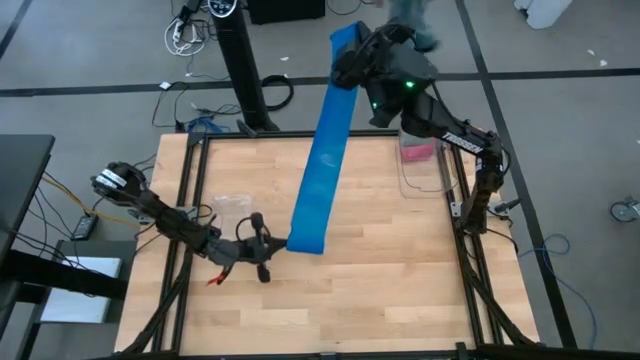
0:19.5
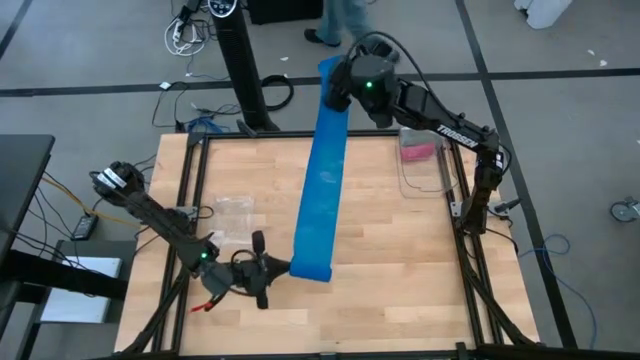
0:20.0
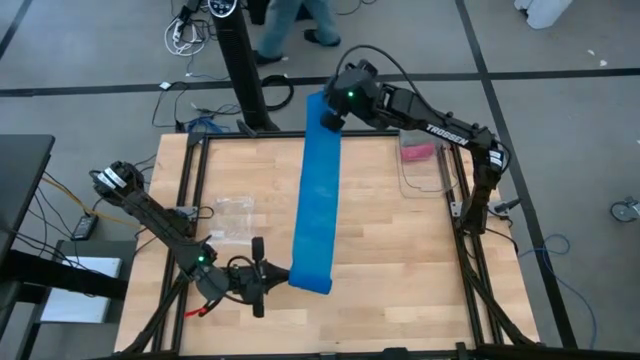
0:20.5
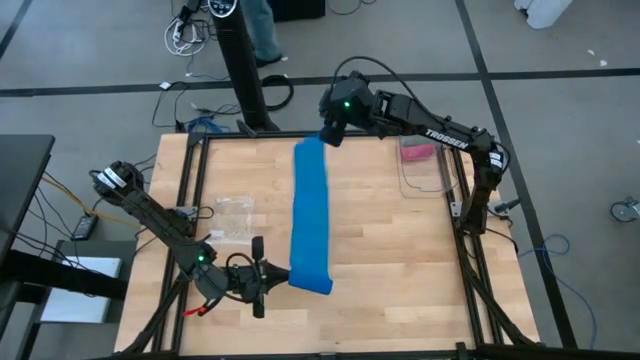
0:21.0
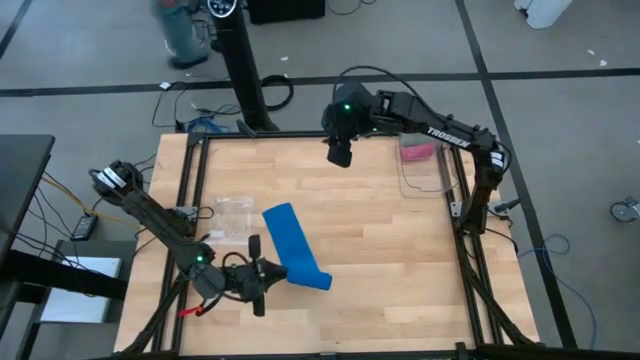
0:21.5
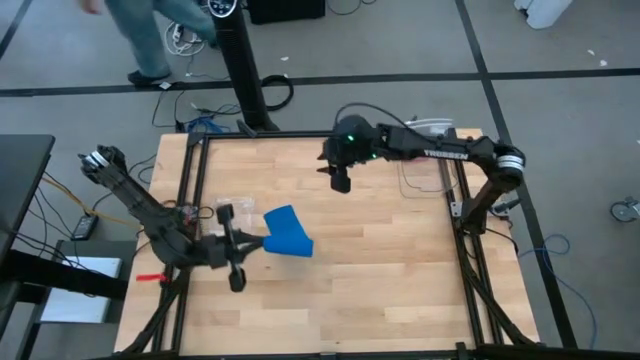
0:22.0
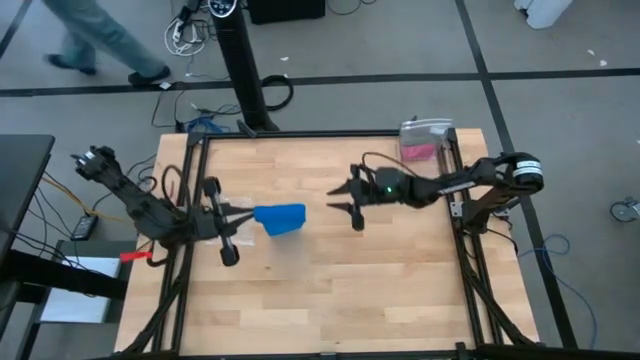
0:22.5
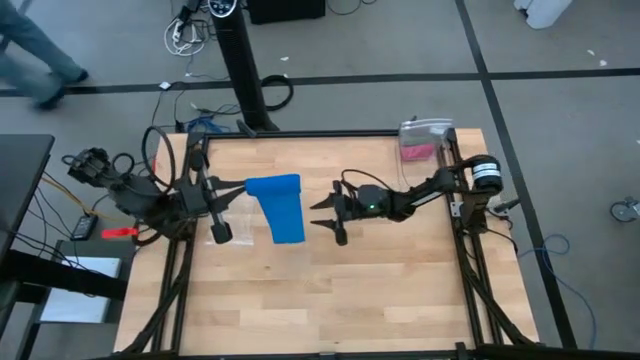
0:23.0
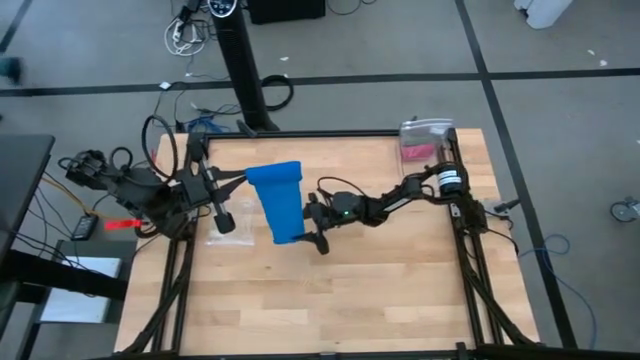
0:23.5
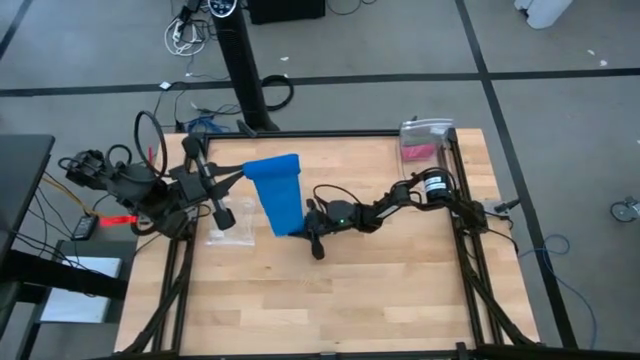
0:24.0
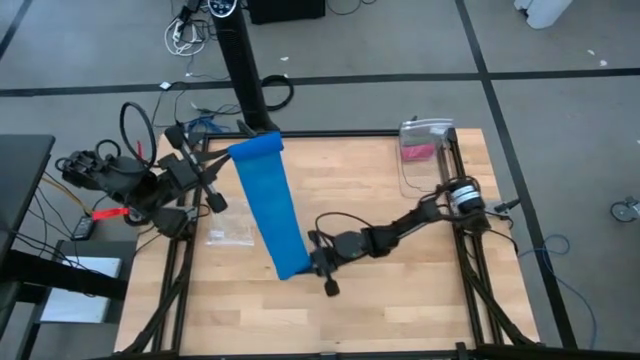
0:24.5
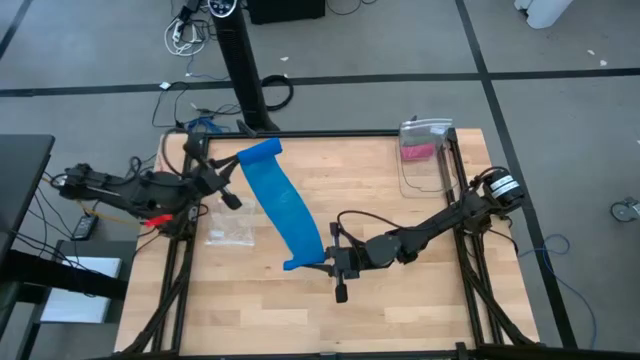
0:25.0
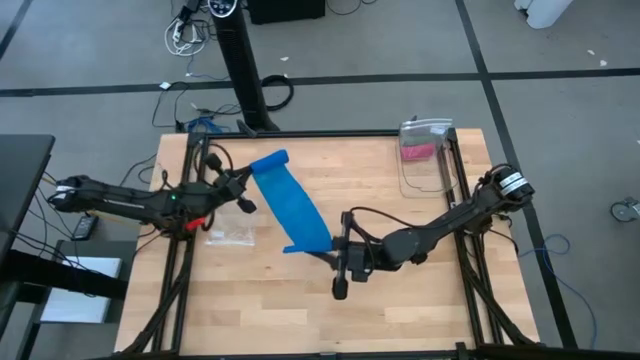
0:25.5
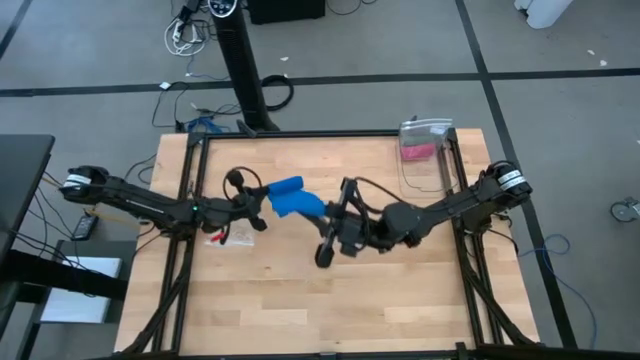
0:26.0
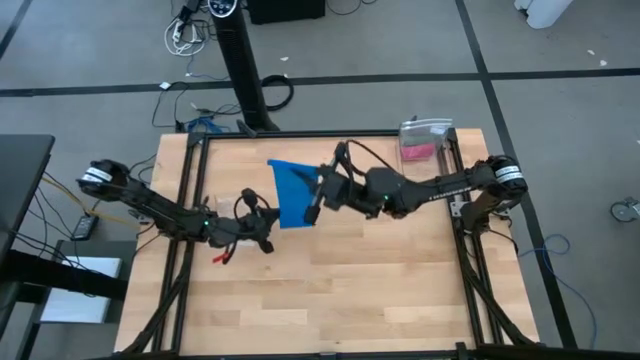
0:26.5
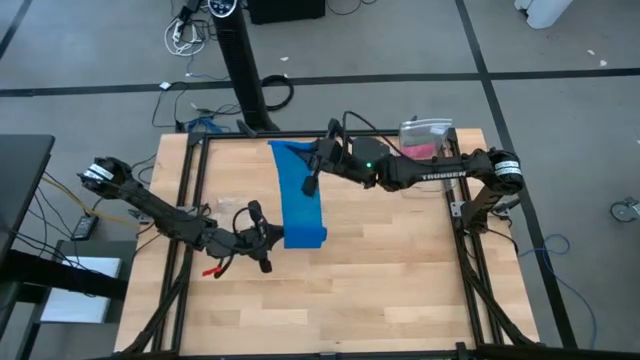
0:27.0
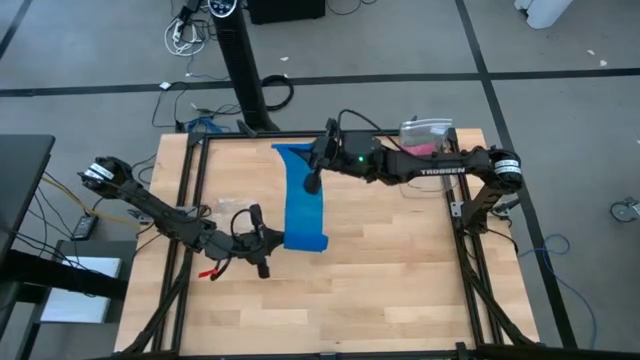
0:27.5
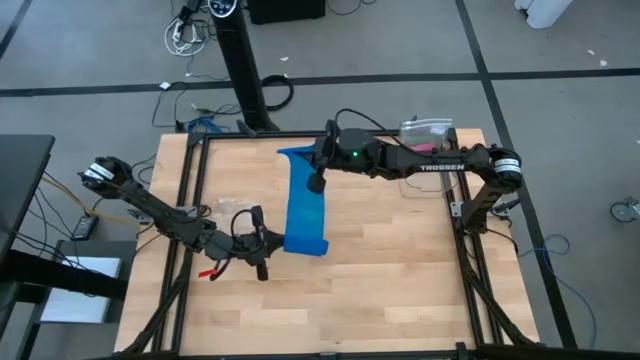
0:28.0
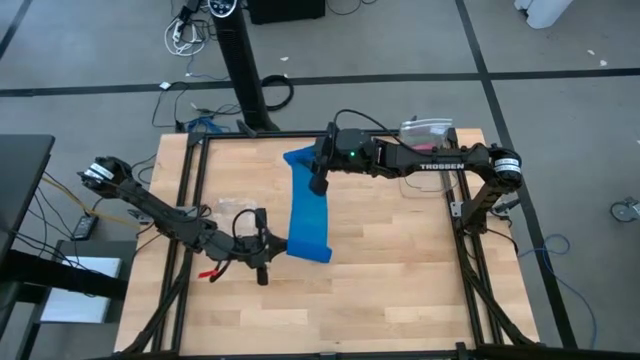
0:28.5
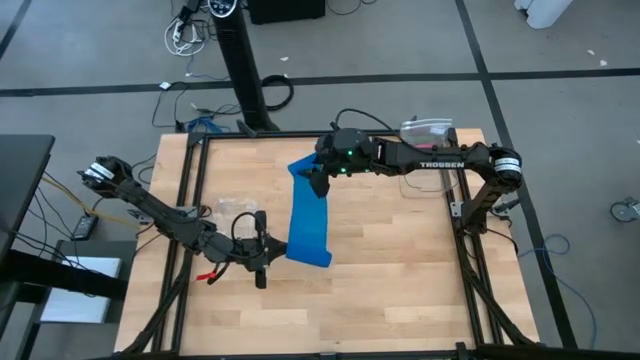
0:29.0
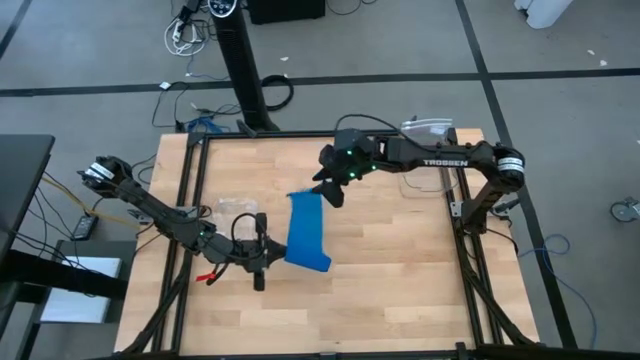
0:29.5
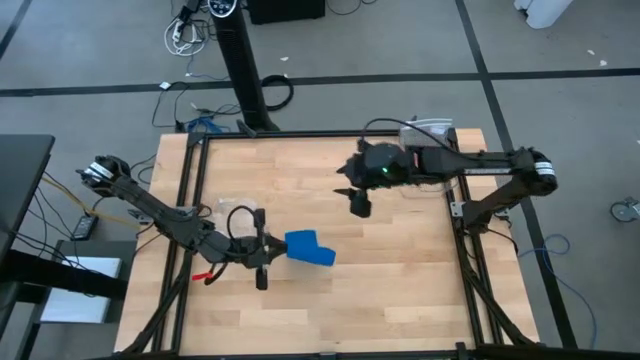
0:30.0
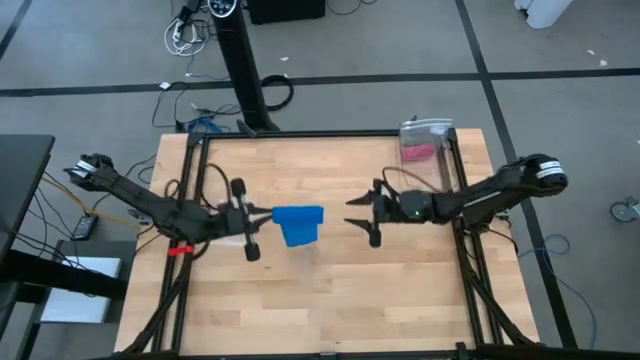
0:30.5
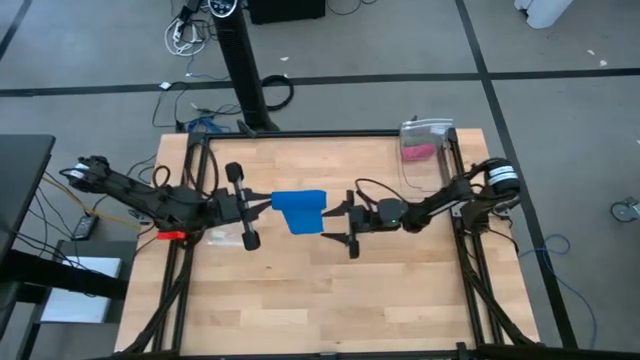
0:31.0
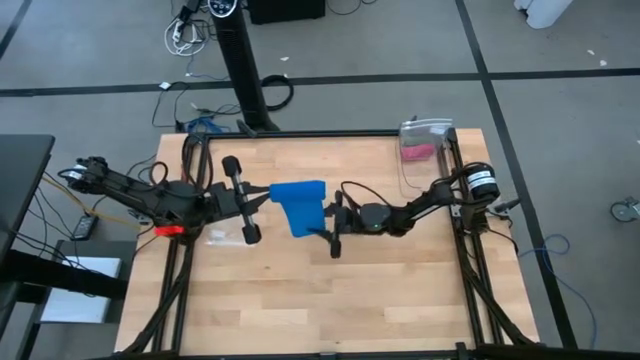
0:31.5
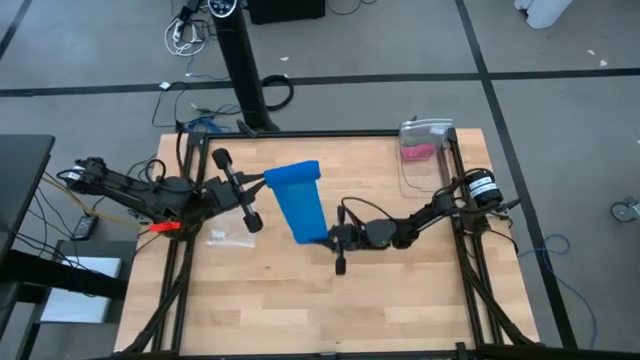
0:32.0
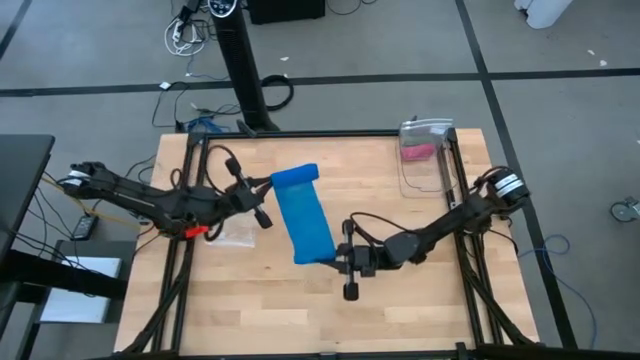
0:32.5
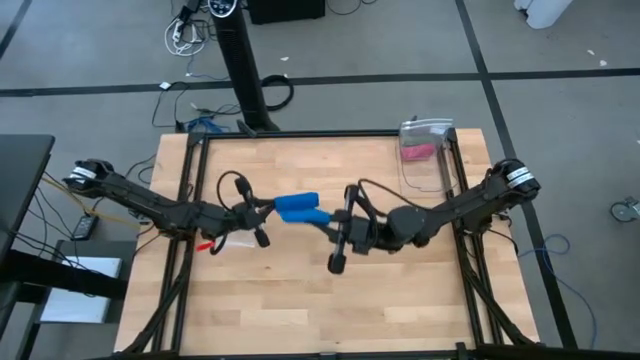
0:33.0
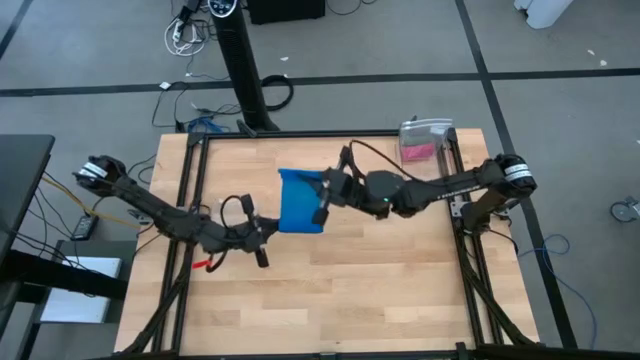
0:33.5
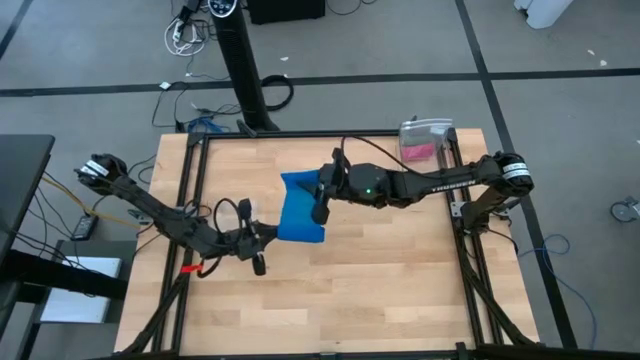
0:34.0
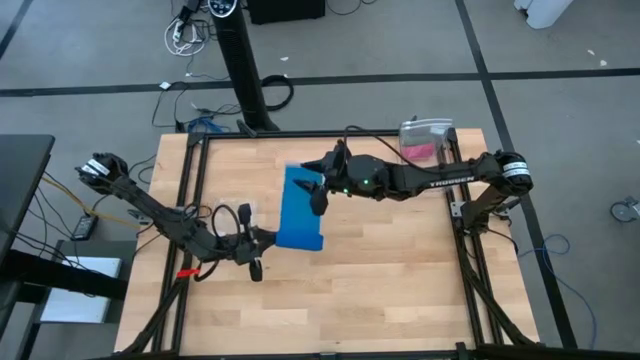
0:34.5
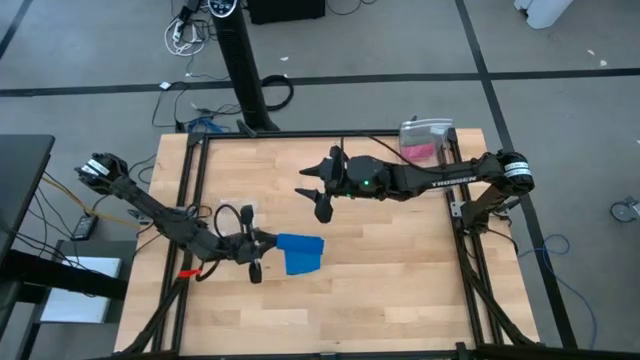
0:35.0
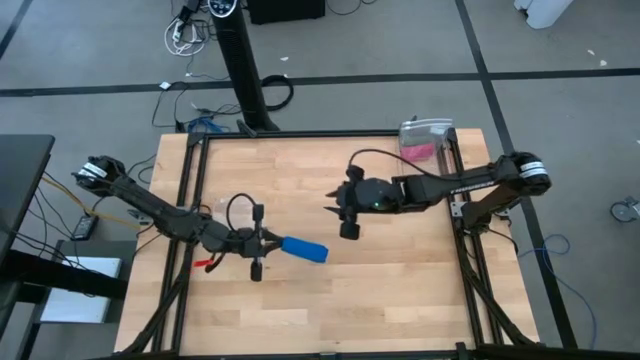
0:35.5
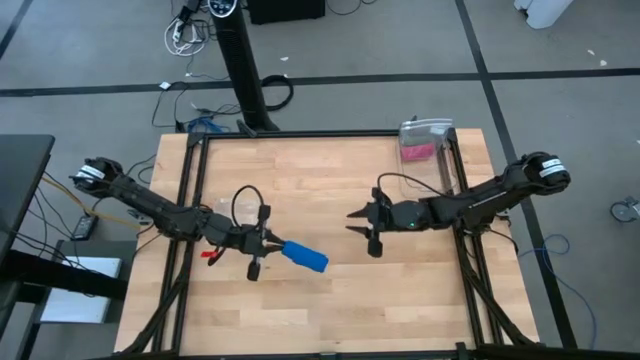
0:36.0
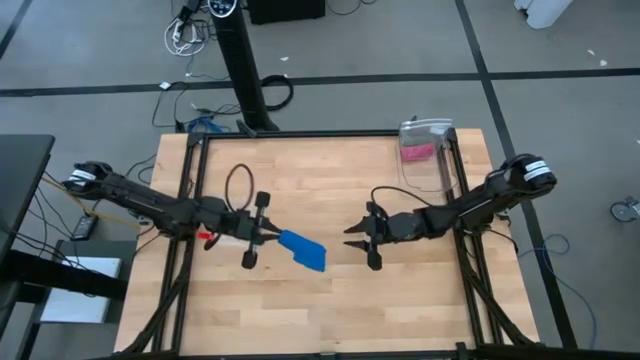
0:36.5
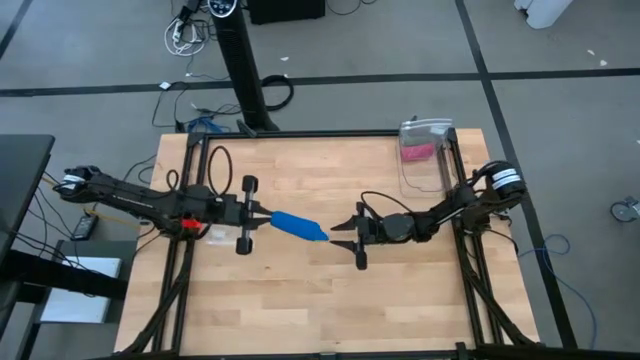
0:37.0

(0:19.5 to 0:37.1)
Task: Roll bandage
Roll the blue bandage
